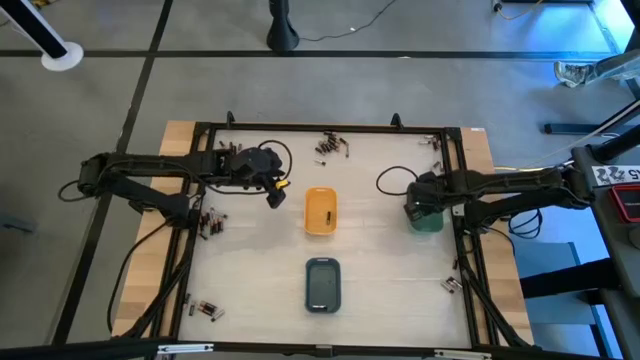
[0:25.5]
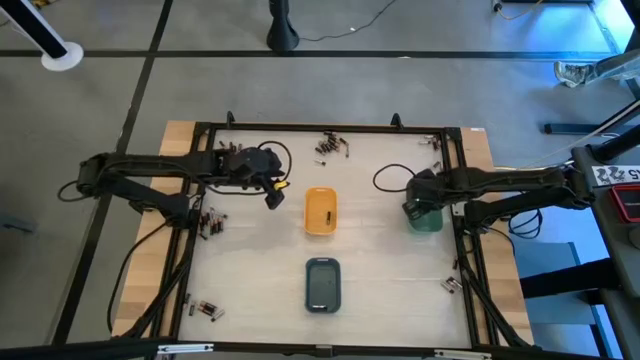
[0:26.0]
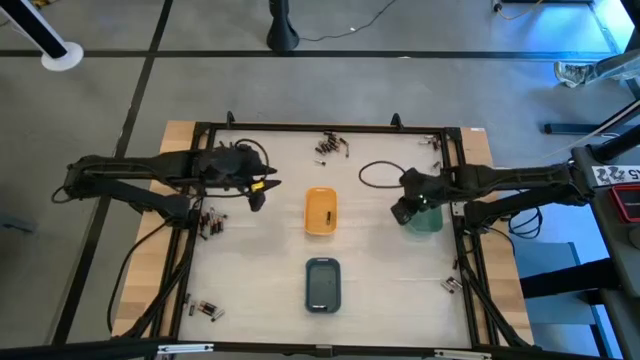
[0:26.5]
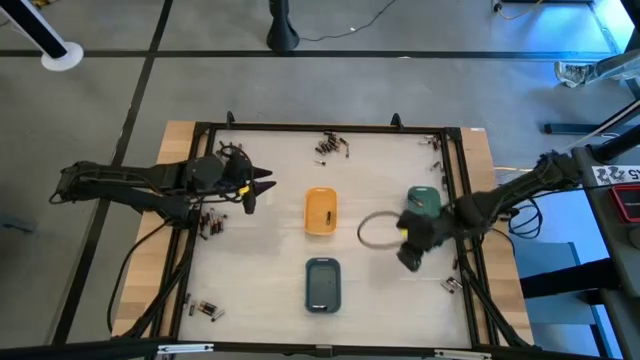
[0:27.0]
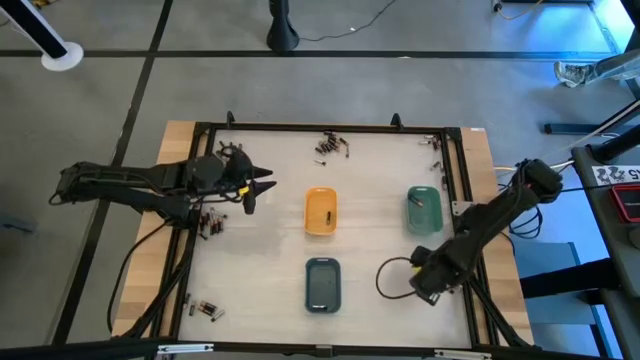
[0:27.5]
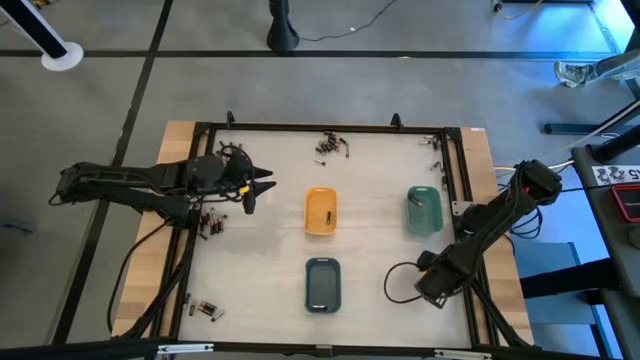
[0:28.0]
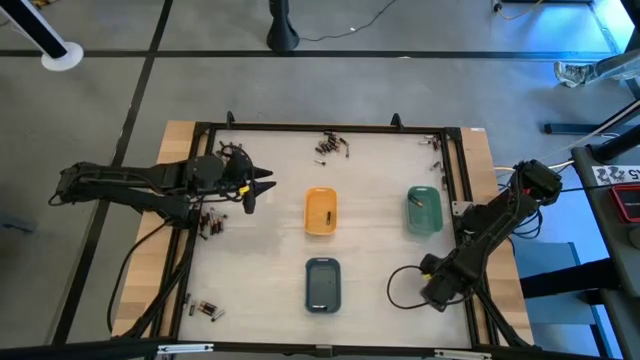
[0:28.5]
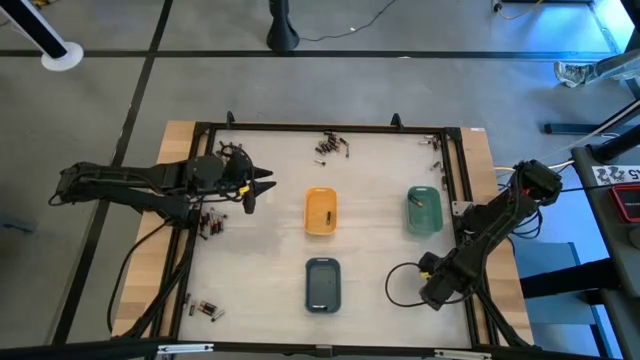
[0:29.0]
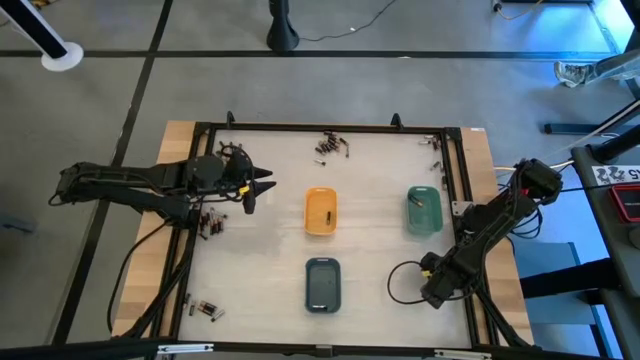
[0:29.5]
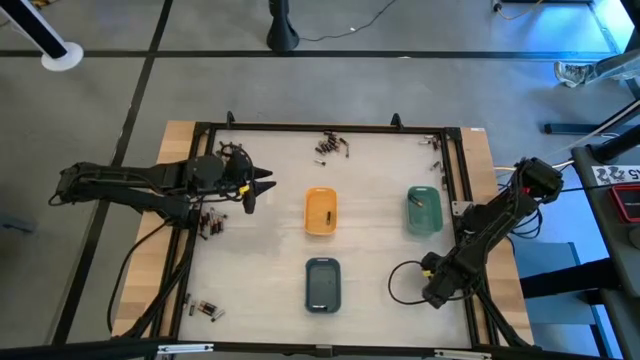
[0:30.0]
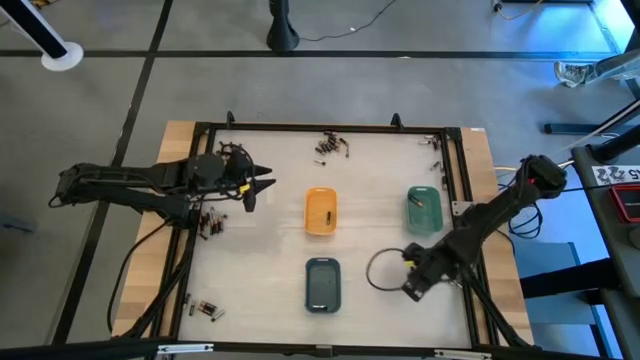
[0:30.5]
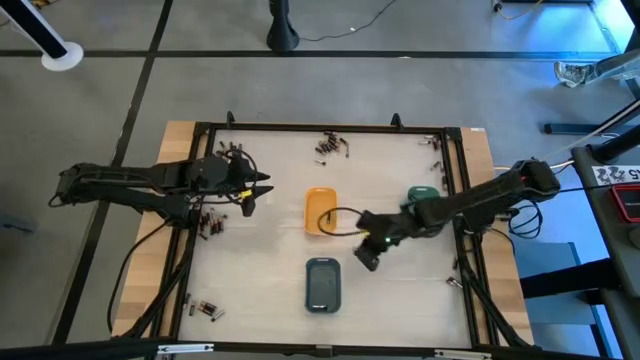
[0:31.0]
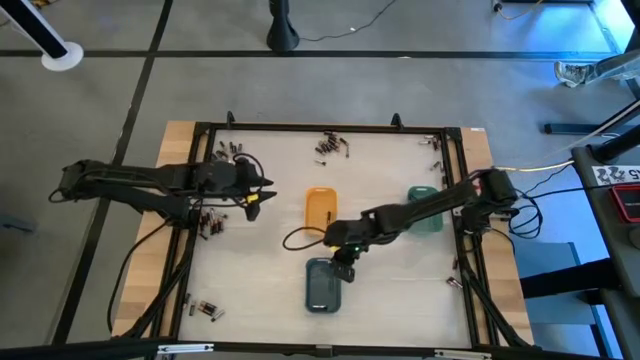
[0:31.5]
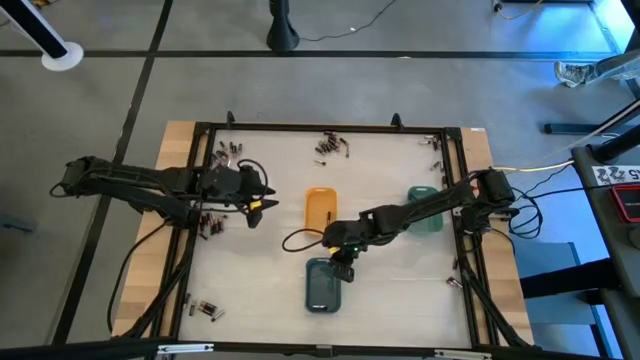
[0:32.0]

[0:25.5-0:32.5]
Task: Sort batteries
Put the bottom right energizer AAA battery into the blue bin

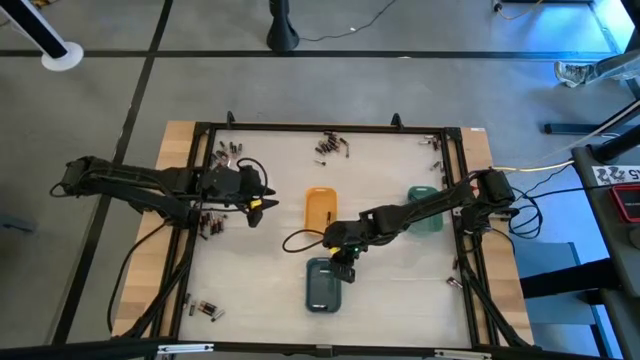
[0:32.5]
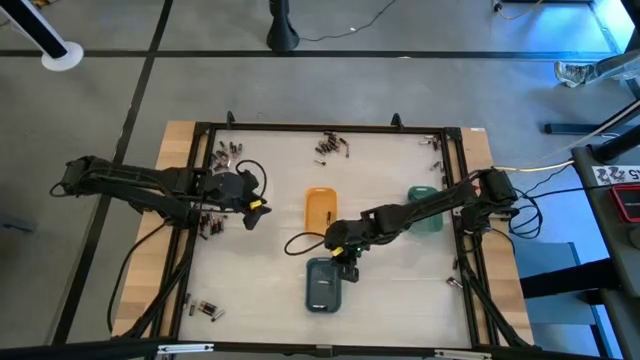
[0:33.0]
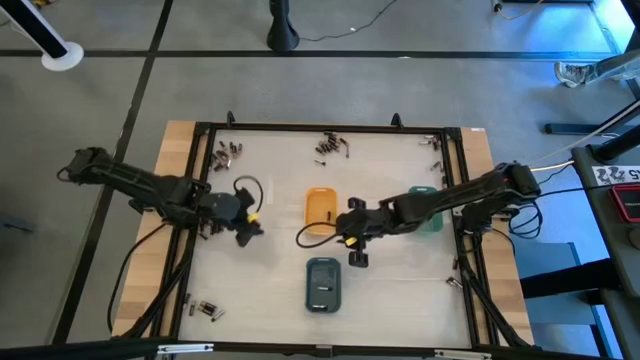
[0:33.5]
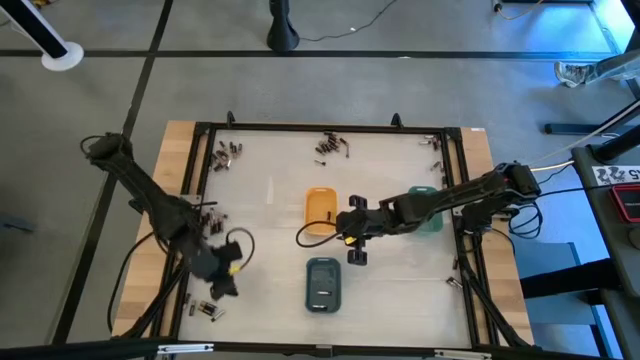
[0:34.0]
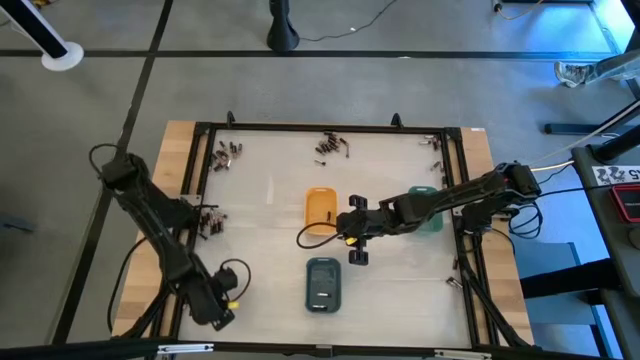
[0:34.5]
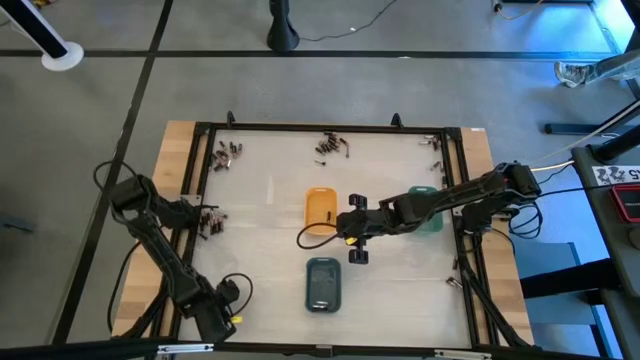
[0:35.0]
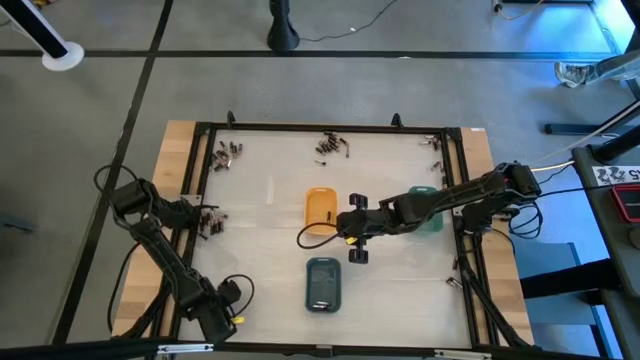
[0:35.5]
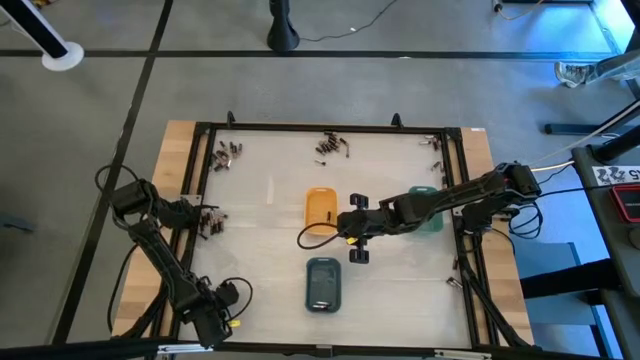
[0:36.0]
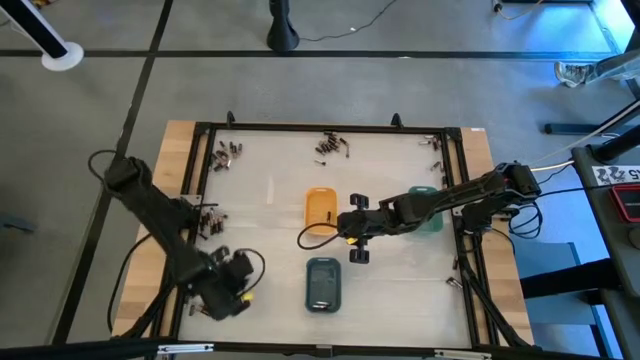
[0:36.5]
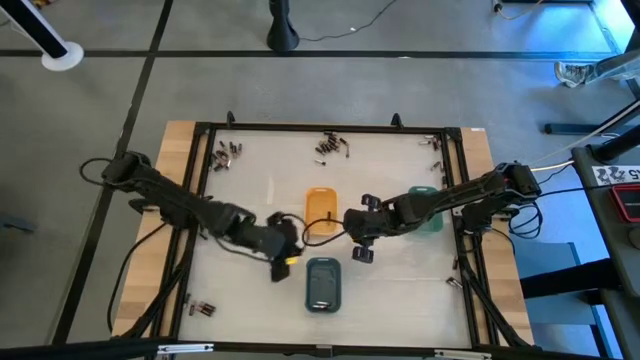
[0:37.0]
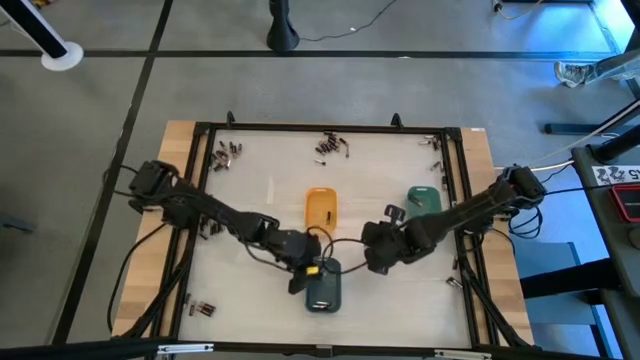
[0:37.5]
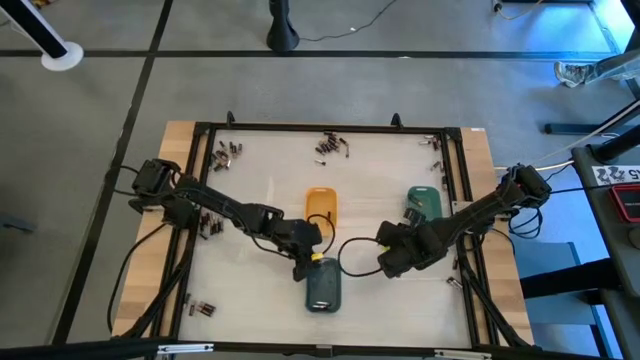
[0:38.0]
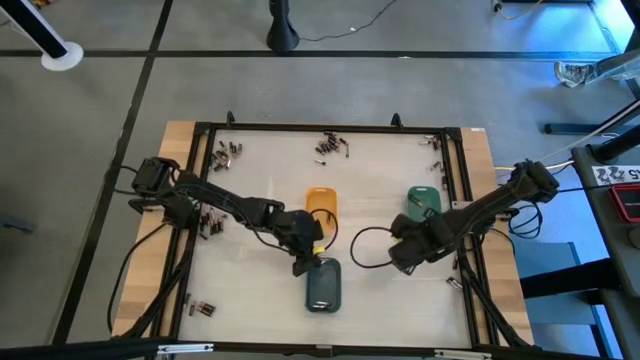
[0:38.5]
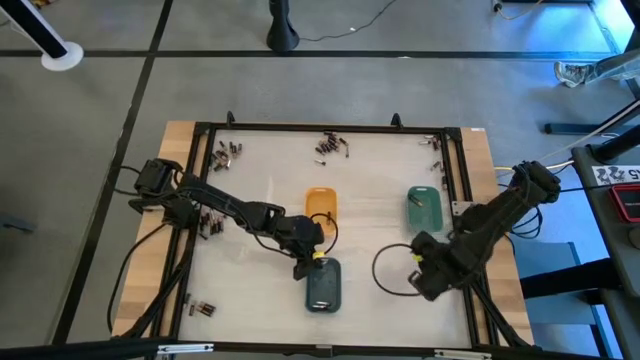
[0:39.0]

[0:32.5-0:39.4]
Put the silver battery into the blue bin

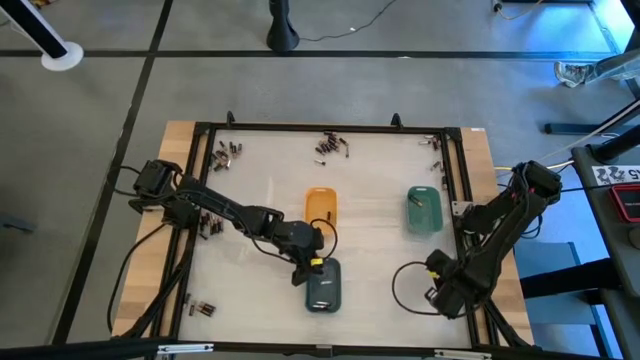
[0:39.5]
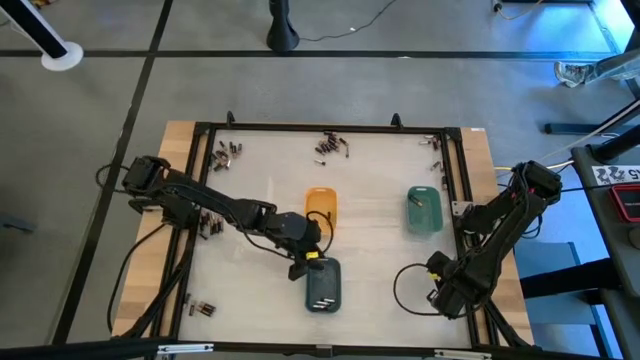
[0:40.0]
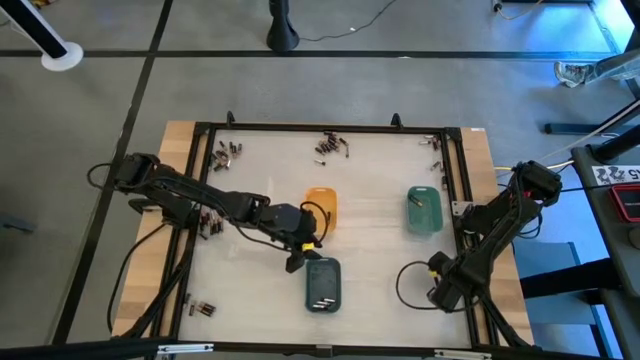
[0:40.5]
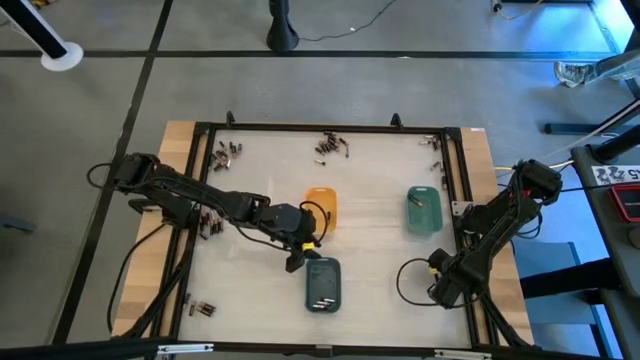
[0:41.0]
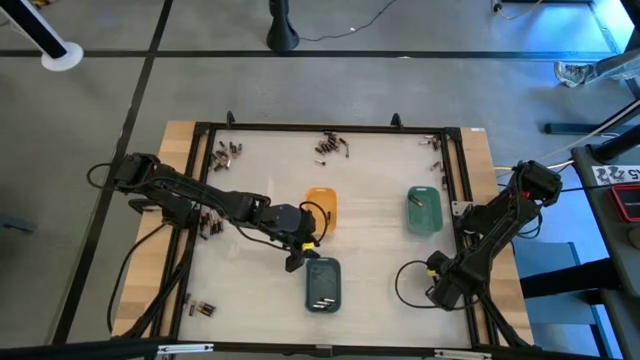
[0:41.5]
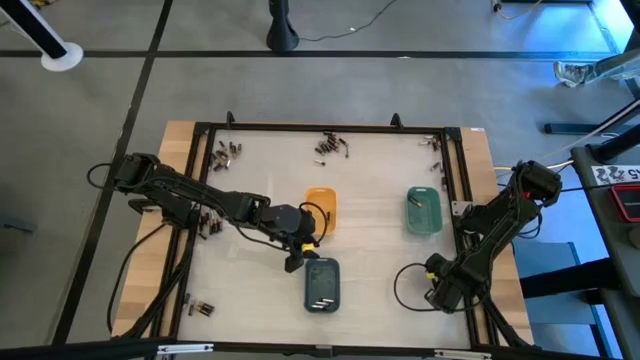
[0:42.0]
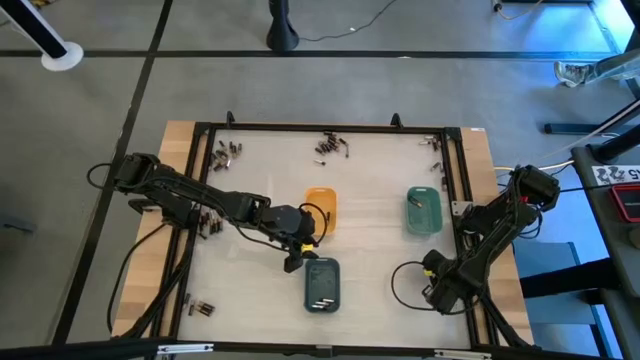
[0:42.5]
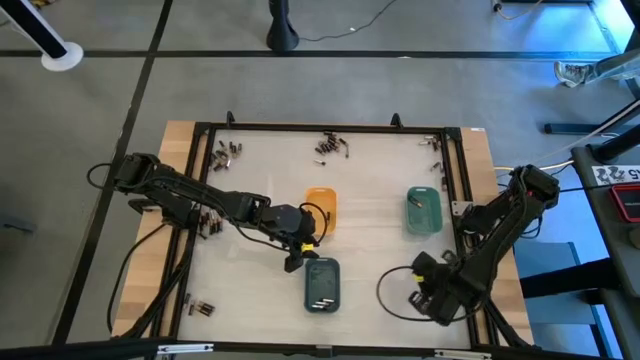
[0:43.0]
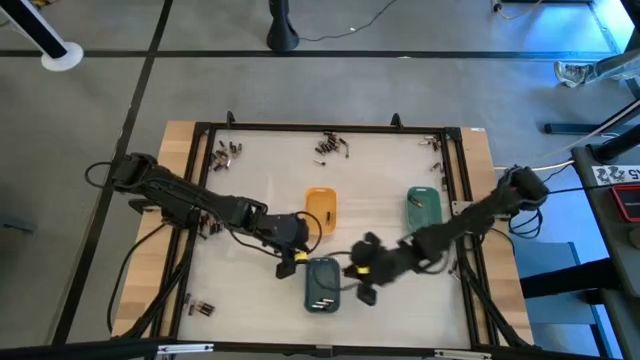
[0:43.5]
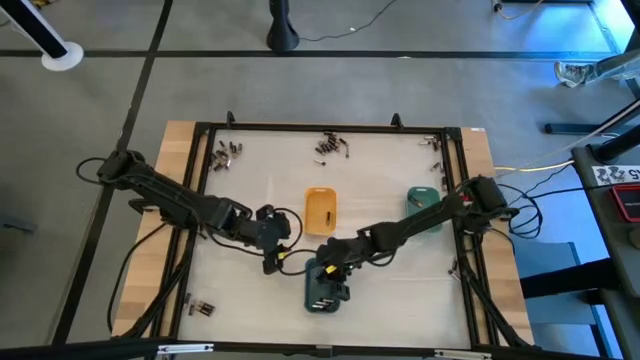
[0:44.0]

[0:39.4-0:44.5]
Put the silver battery into the blue bin

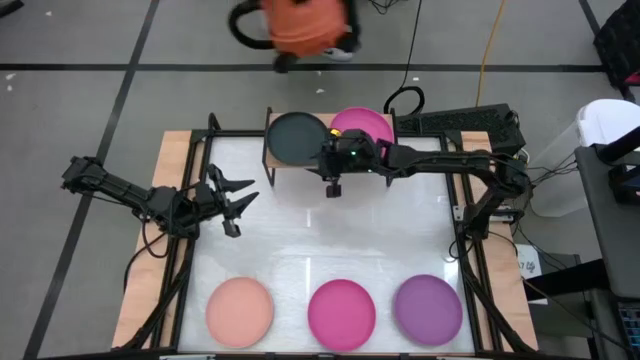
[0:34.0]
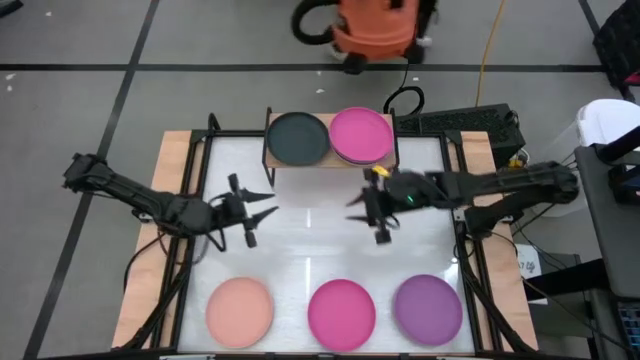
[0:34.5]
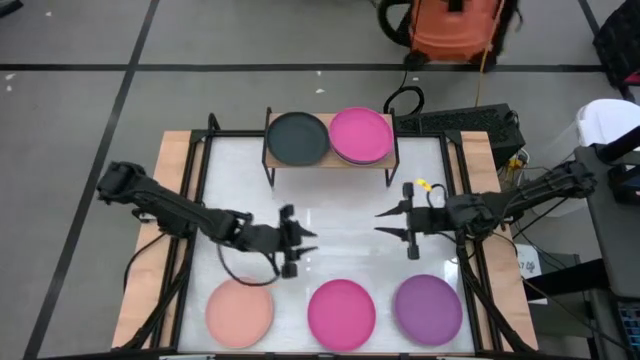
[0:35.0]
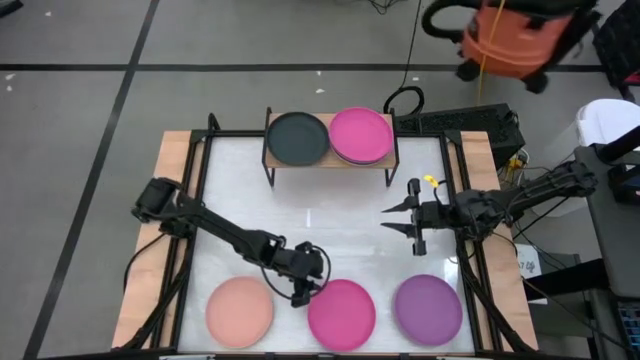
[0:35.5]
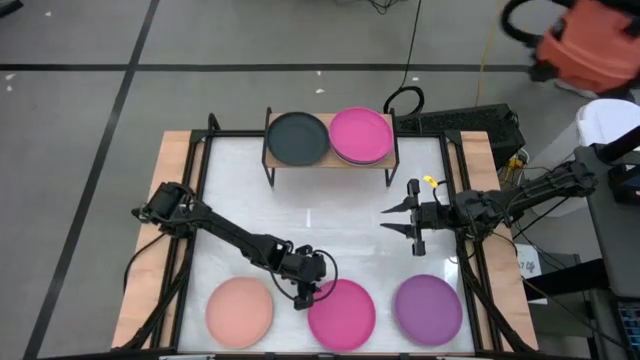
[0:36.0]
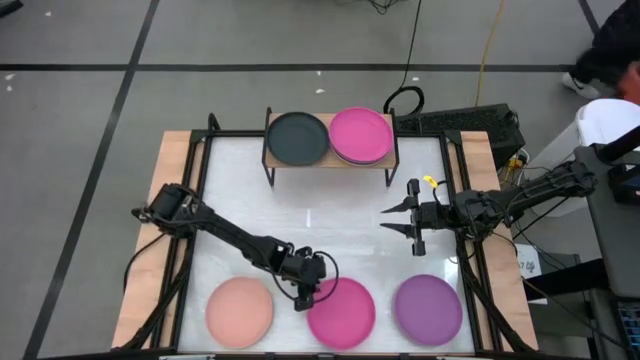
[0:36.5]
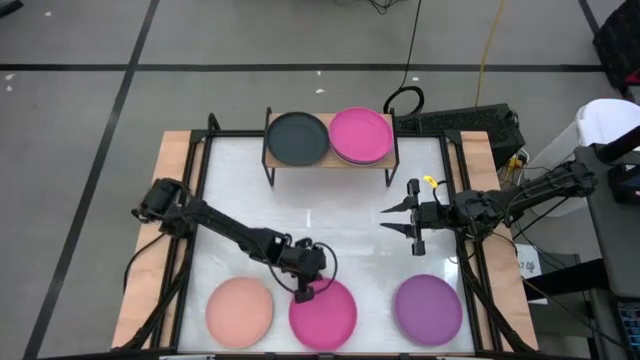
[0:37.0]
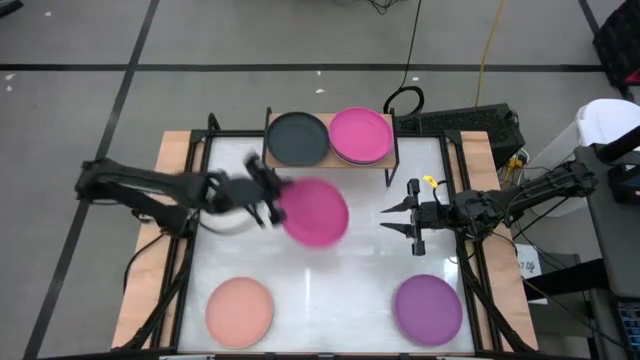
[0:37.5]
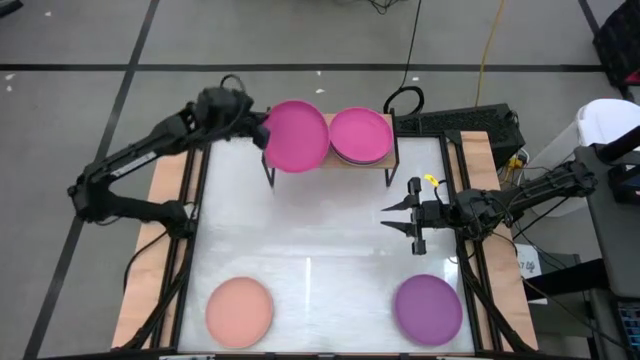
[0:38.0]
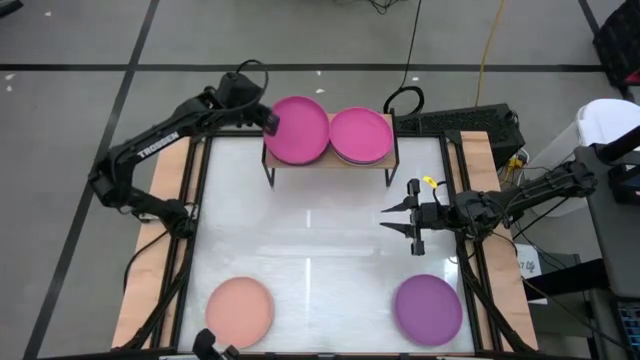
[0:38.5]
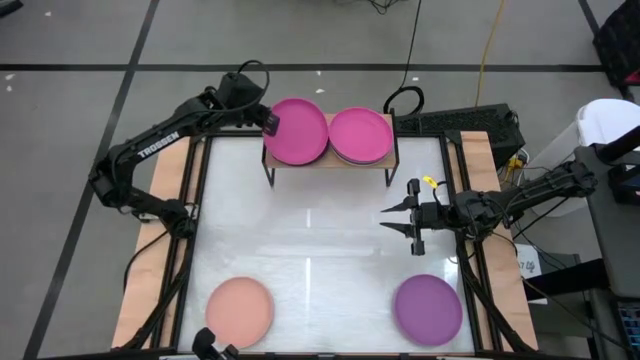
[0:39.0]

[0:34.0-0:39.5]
Task: Place and stack plates onto a shelf
Stack the pink plate on the black plate on the shelf
